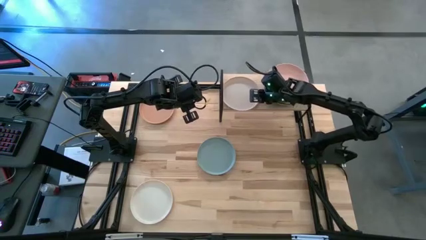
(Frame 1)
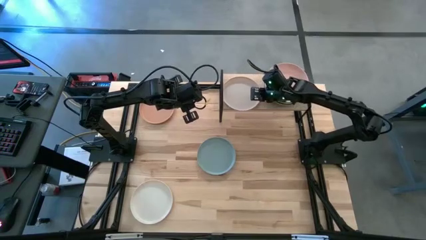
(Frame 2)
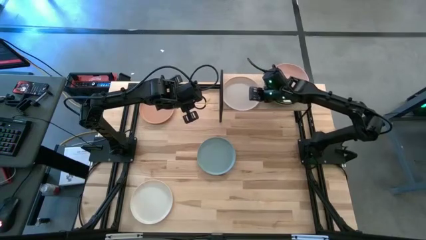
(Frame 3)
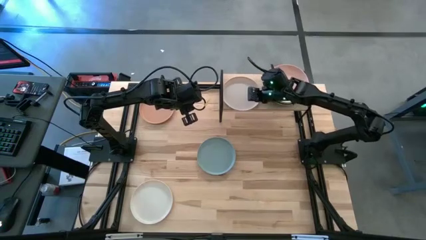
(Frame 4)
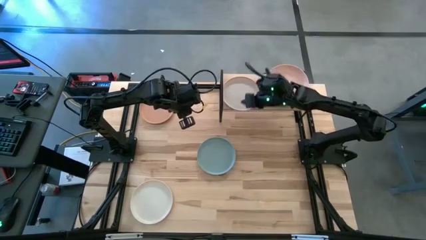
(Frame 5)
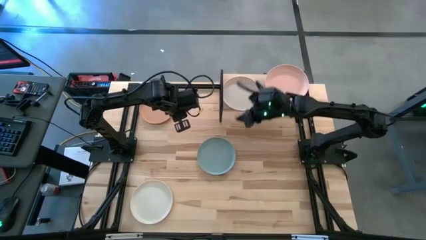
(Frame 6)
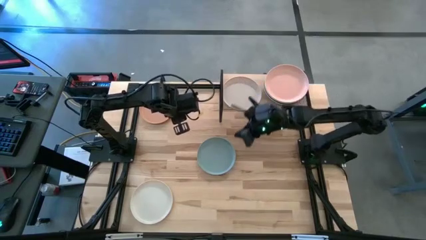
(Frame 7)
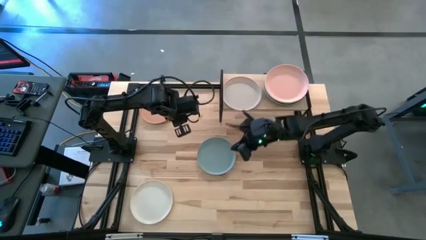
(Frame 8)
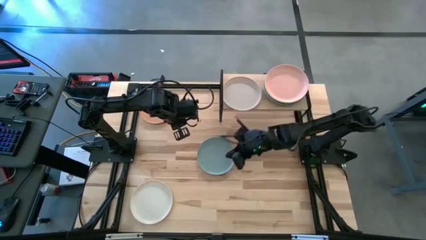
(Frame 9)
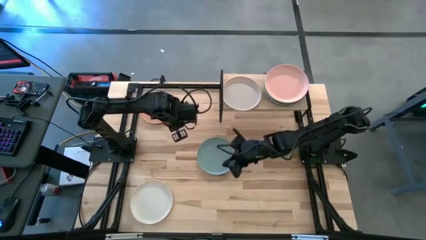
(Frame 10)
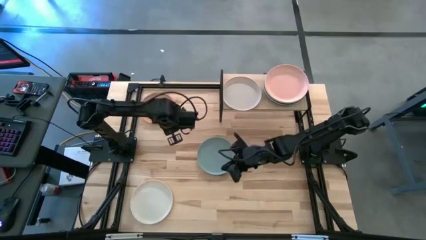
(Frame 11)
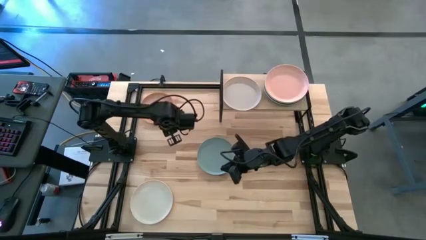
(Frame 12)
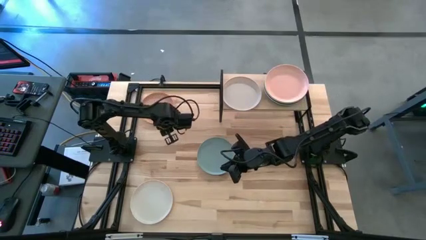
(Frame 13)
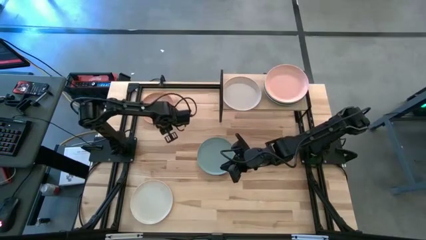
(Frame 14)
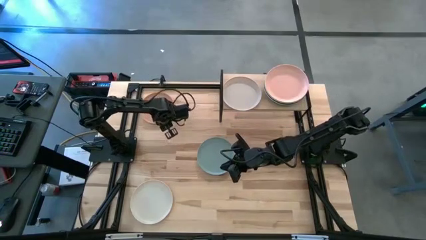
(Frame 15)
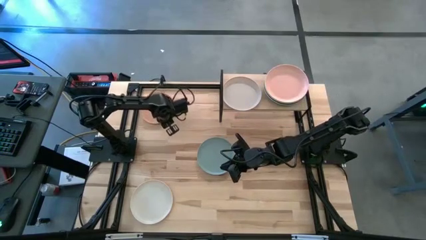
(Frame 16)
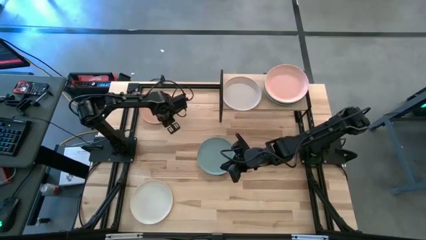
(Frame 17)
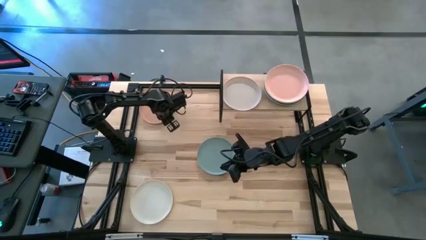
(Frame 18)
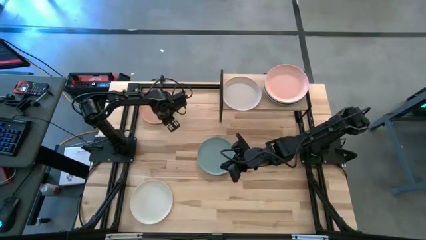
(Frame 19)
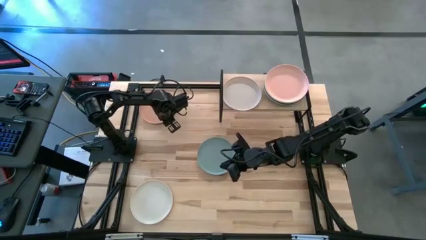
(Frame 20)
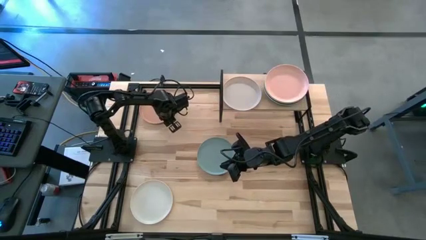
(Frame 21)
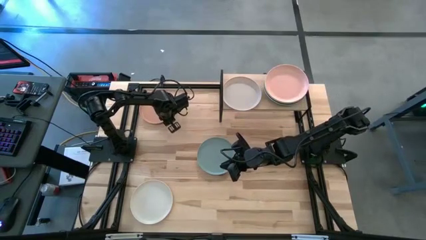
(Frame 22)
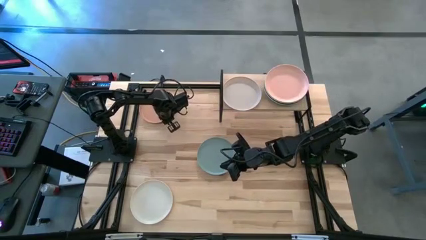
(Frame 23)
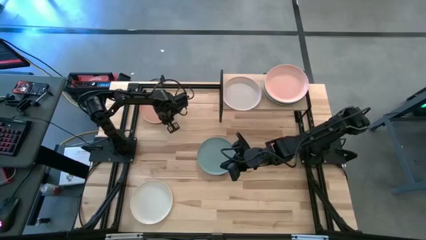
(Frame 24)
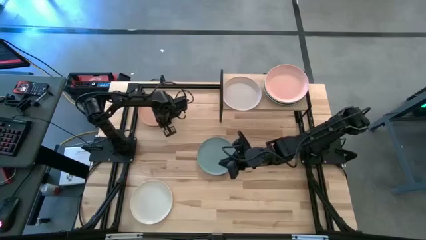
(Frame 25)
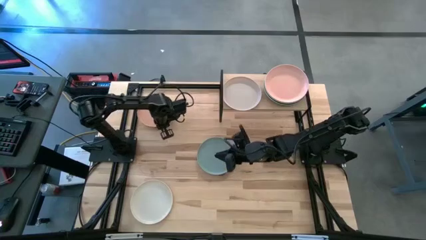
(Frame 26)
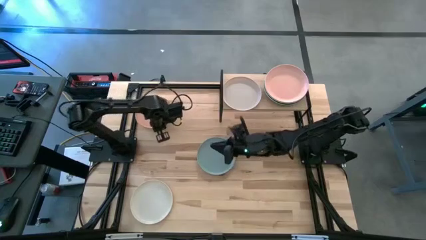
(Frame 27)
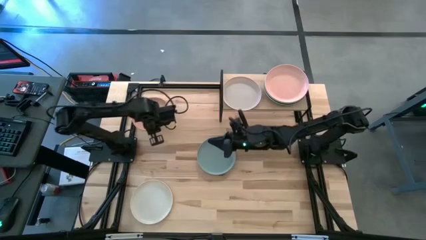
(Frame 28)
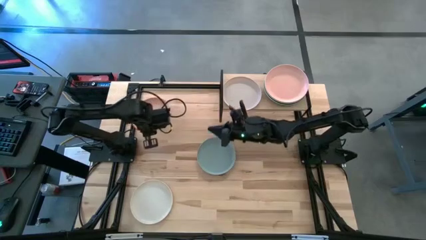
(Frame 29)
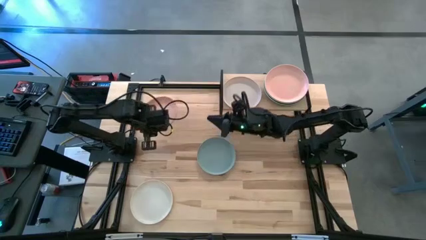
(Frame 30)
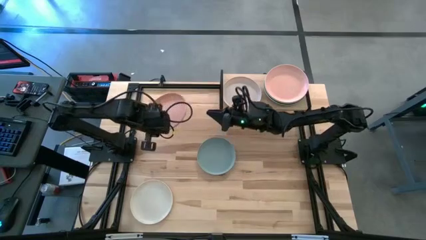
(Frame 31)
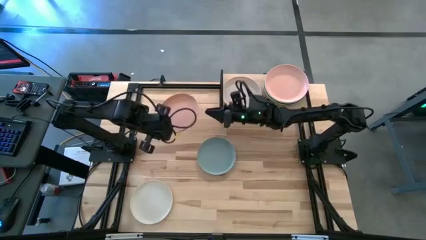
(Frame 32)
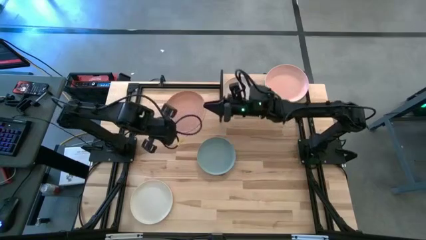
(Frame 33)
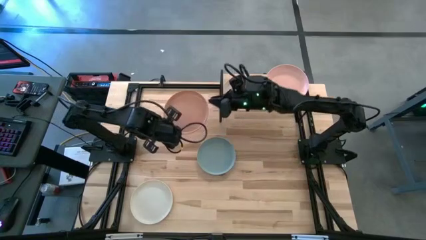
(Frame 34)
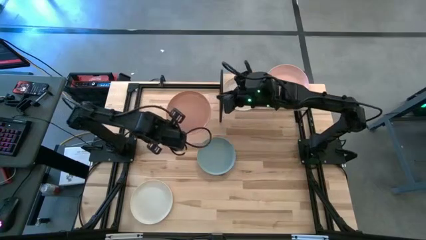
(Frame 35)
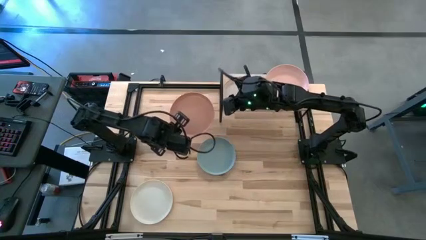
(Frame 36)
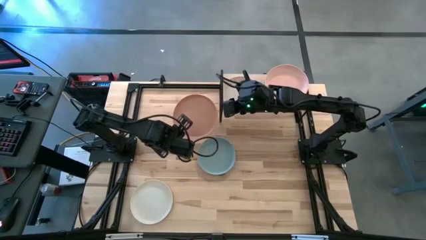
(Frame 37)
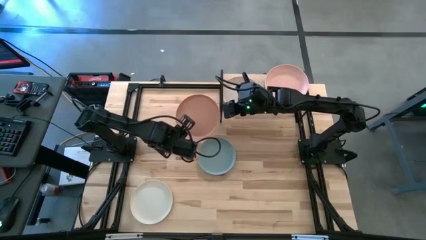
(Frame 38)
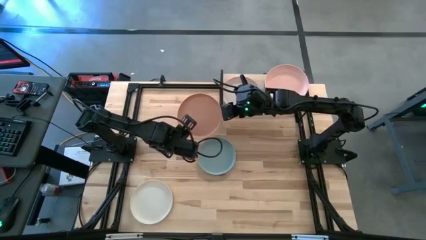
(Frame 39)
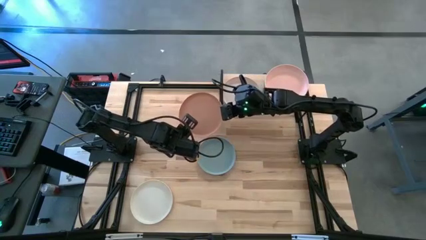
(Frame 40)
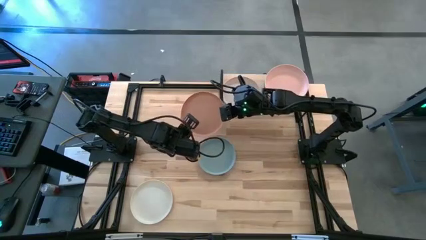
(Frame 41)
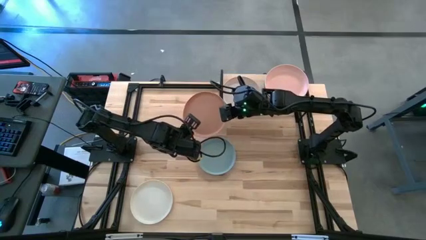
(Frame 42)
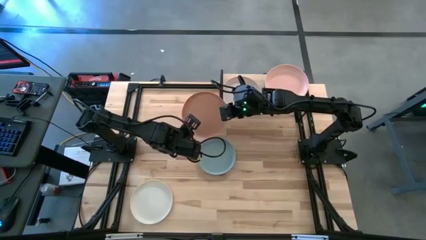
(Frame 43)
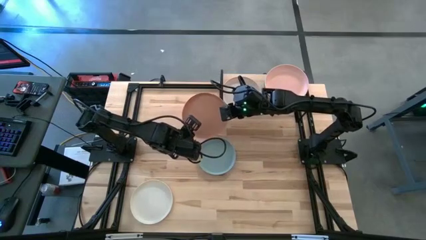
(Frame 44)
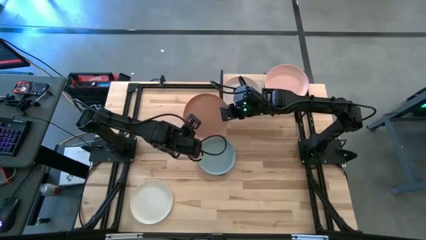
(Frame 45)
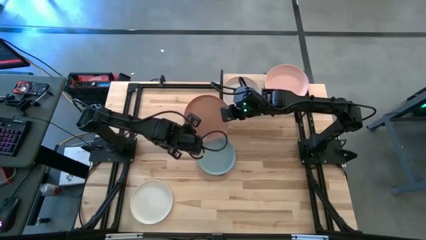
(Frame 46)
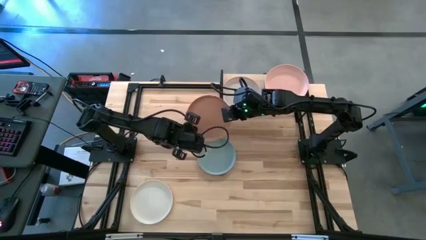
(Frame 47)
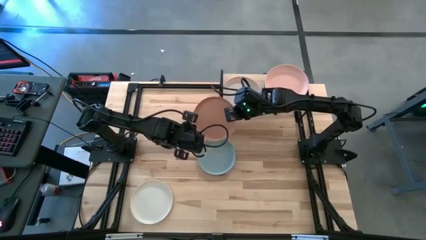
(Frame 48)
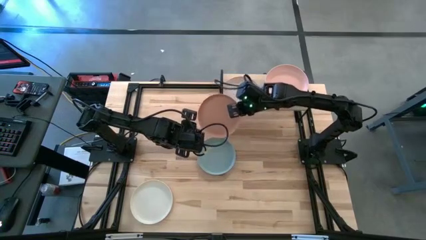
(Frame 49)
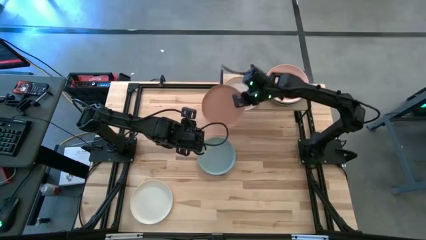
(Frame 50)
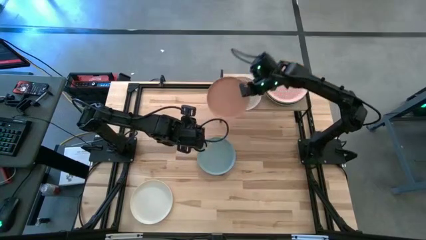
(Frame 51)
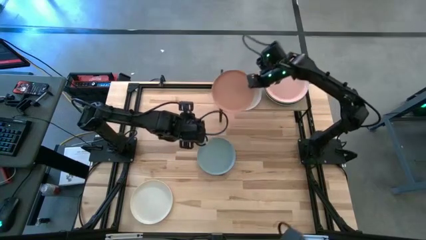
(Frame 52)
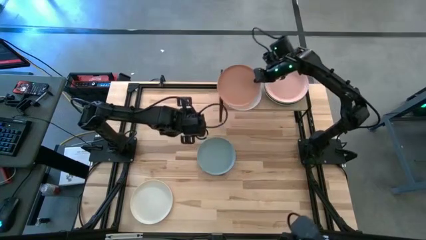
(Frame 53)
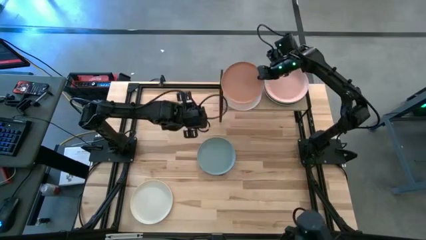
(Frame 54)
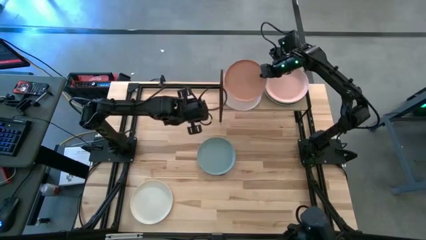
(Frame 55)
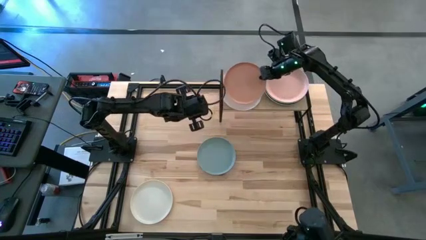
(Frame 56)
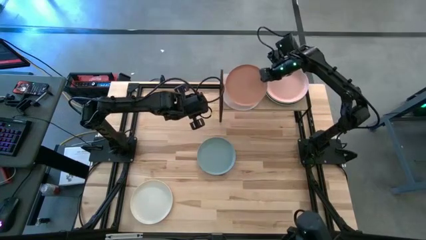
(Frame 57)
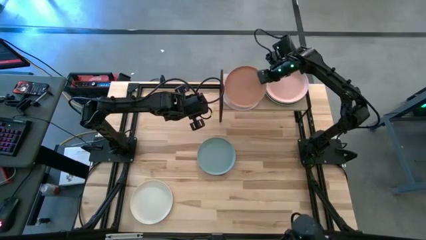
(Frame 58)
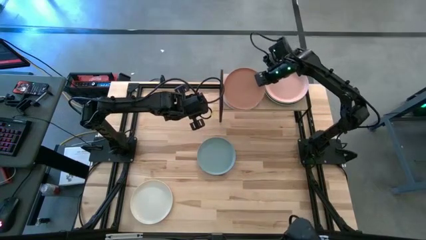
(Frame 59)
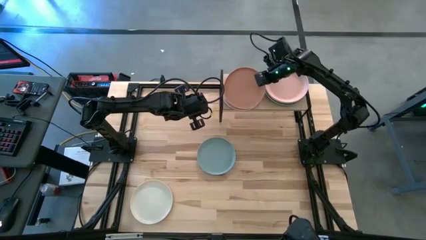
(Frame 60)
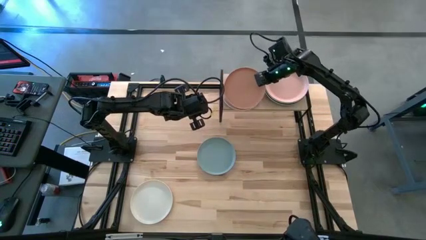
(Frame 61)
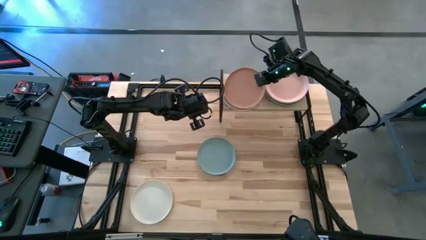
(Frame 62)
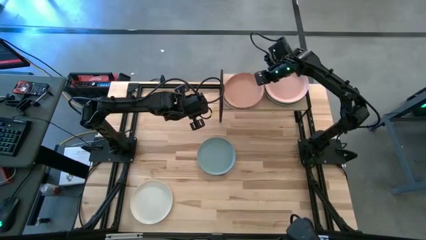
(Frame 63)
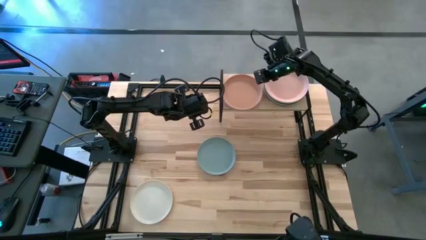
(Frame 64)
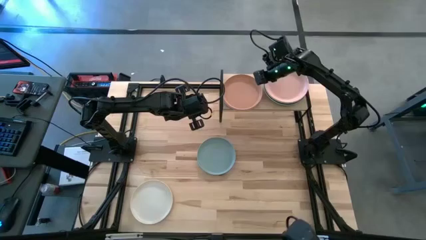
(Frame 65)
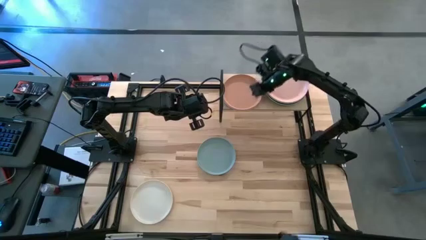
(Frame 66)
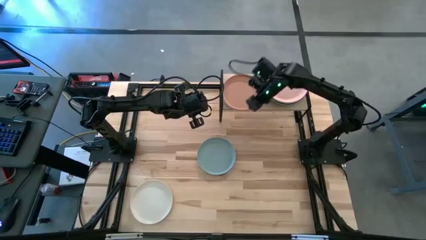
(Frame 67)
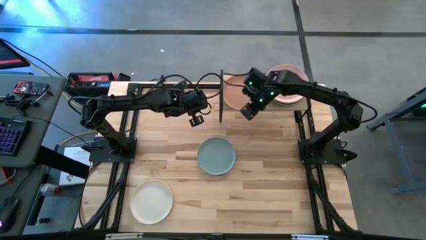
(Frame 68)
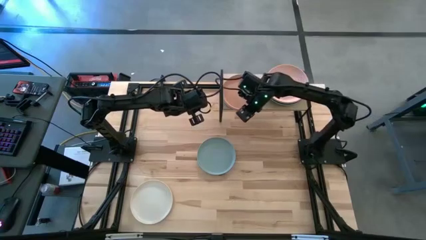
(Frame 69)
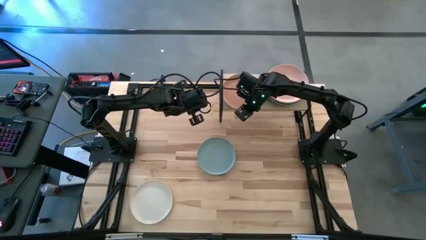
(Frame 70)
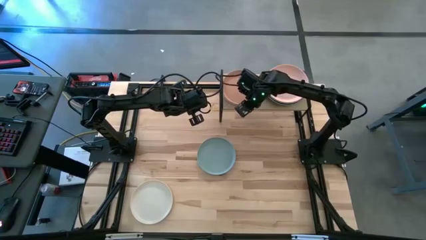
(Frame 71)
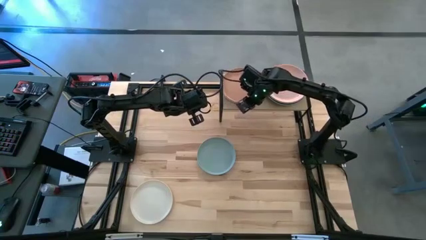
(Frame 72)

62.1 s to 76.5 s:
Task: Place and stack plates onto a shelf
Stack the brown on top of the light brown plate on the shelf
